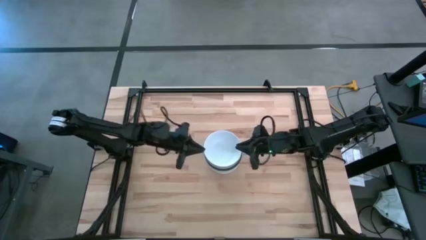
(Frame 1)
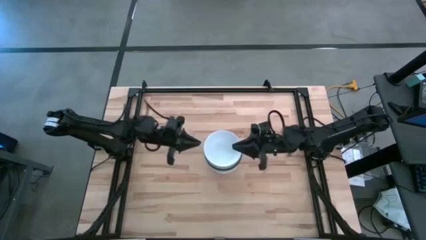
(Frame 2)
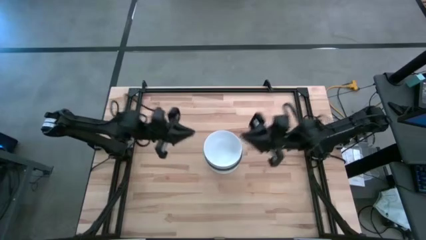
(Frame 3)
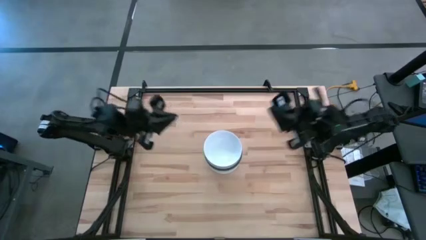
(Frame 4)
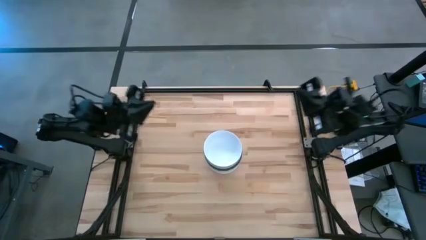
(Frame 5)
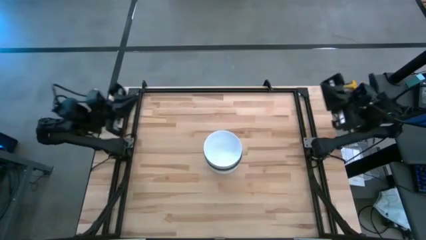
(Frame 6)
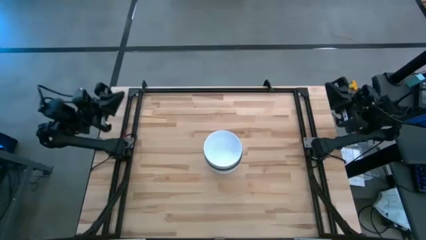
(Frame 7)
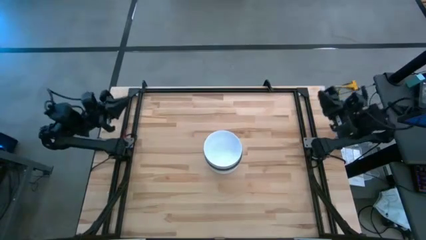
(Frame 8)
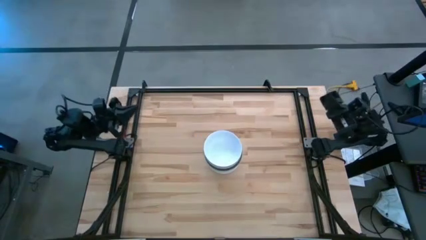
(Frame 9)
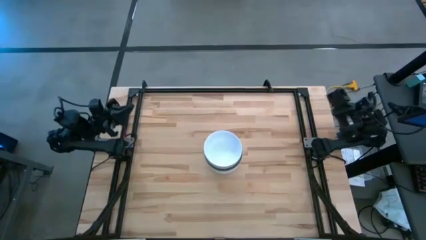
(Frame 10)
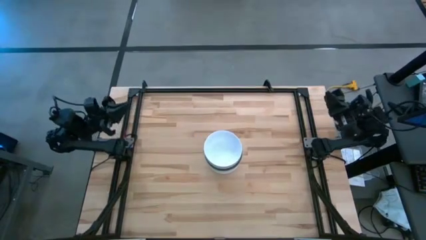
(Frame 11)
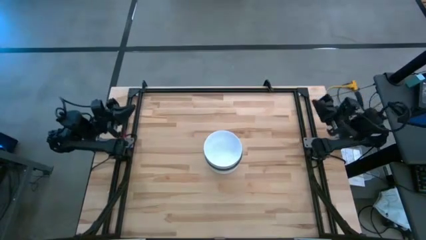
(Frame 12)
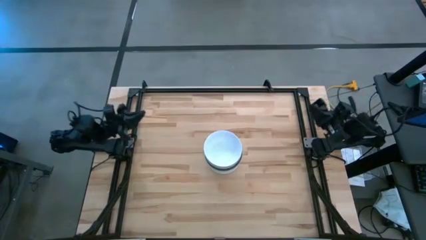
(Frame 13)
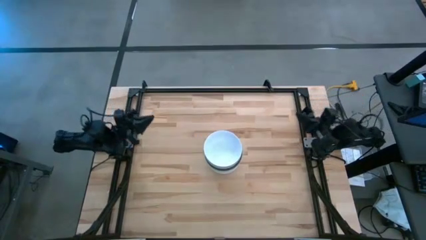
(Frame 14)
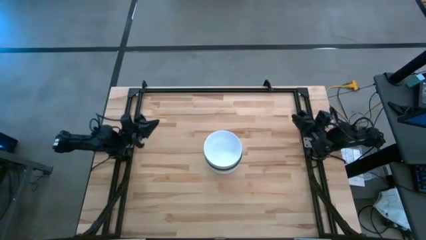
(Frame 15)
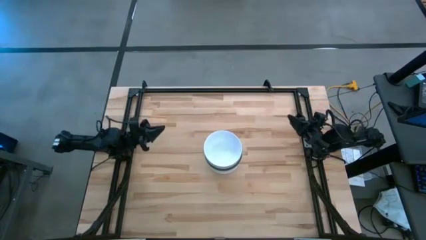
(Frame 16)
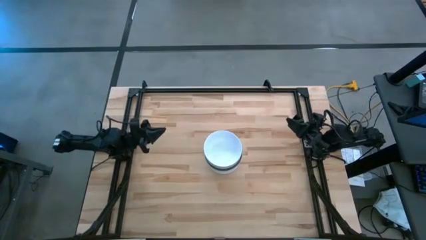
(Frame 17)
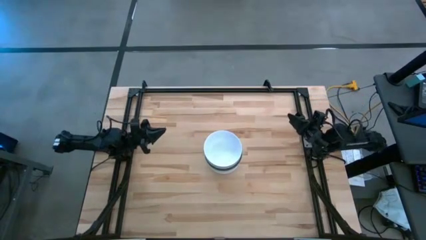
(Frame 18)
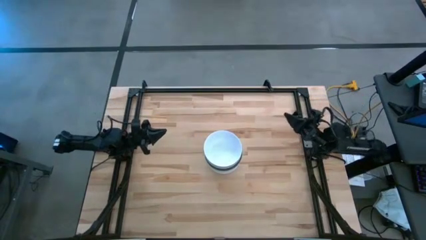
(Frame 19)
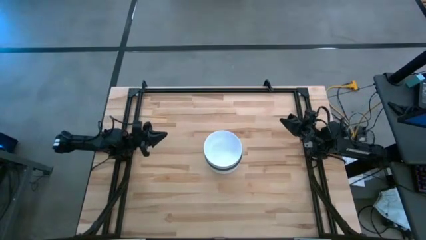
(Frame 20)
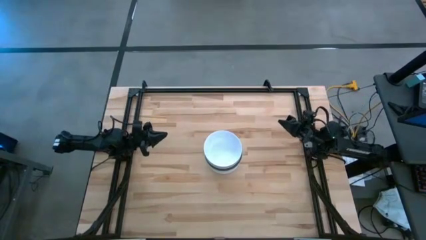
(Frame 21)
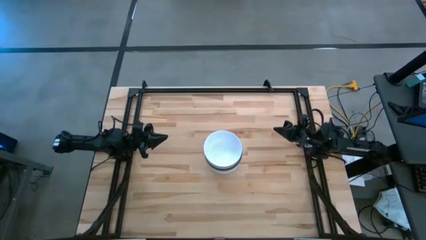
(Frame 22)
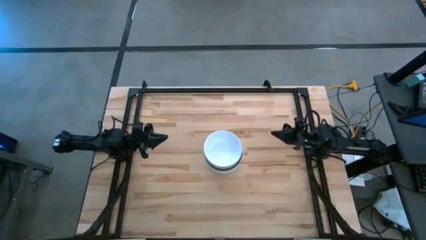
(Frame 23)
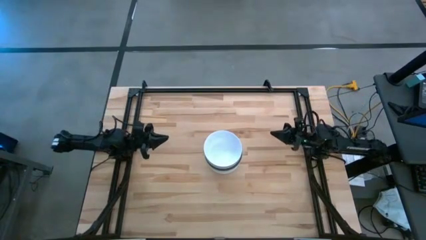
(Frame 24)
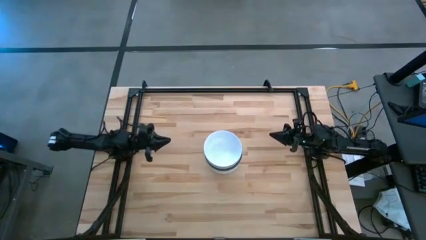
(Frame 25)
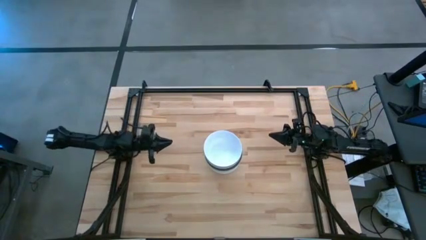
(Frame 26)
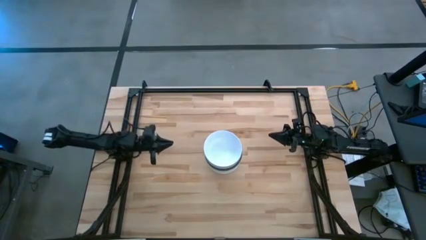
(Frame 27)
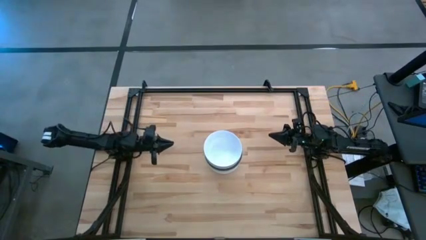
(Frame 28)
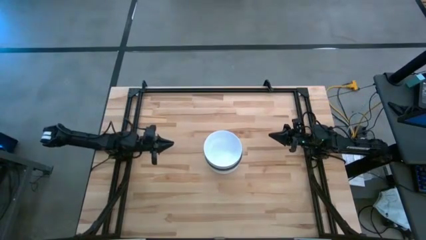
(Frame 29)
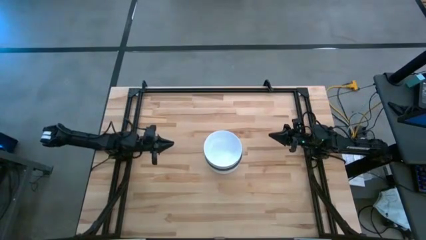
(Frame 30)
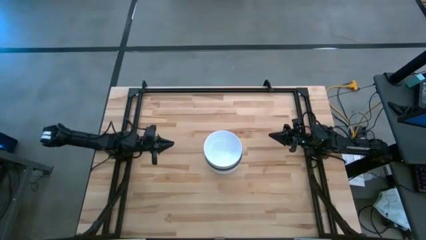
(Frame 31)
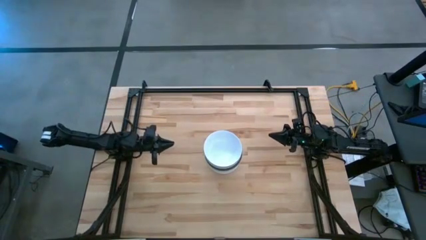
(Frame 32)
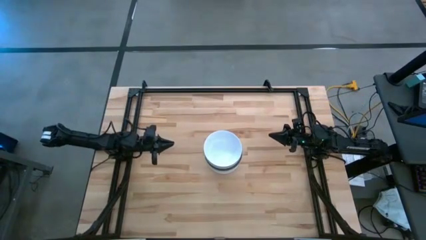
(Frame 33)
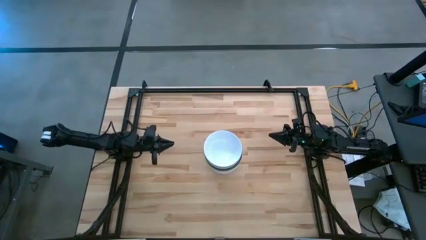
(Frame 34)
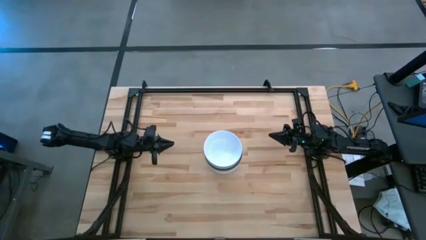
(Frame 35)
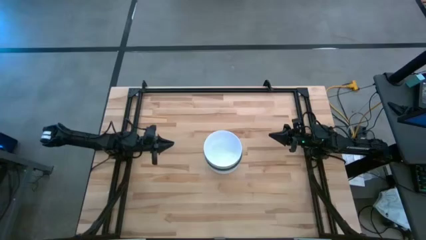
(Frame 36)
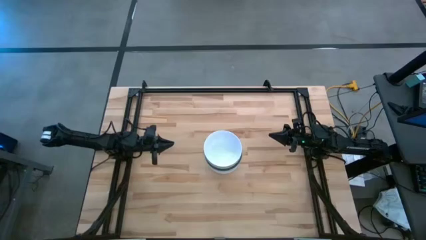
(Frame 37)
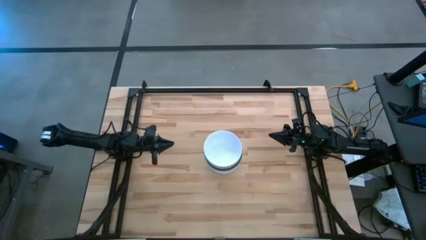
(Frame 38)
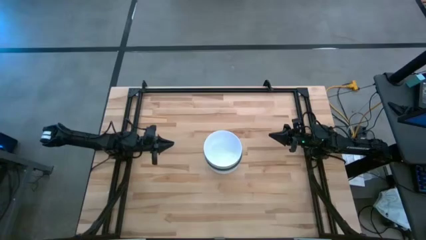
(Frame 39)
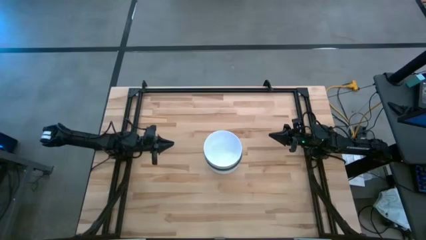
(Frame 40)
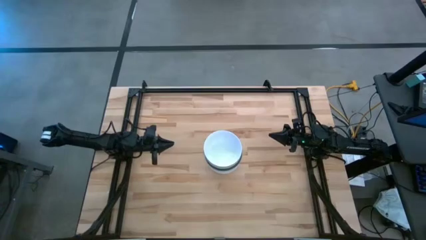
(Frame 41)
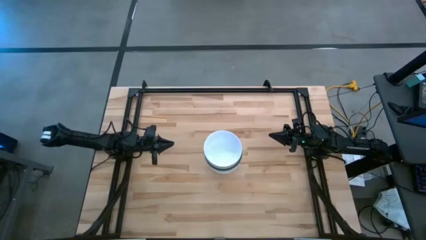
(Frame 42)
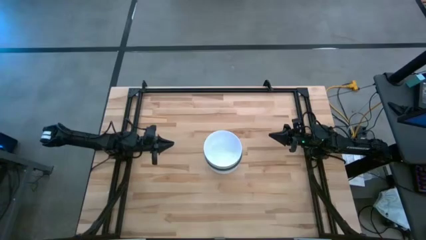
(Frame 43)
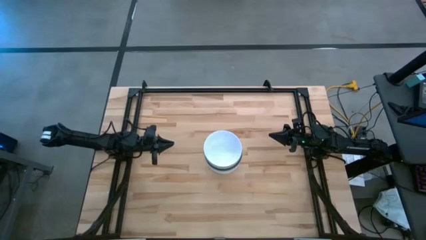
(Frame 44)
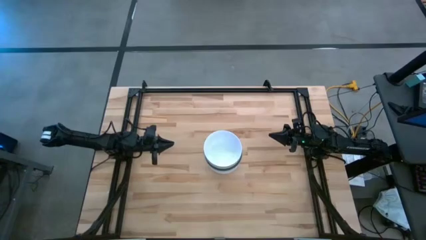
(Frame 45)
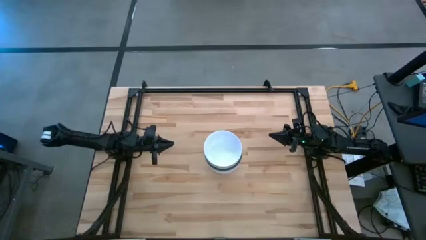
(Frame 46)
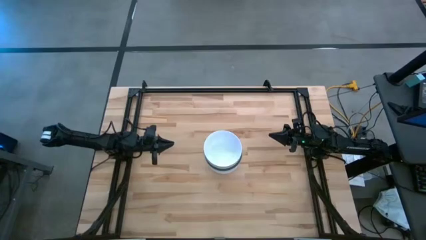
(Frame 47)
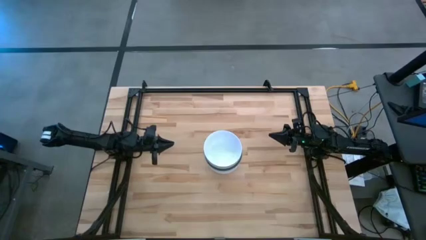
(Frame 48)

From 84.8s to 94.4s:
Task: Nest bowls inside each other
Return to Home Position
